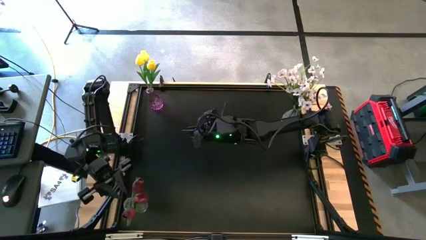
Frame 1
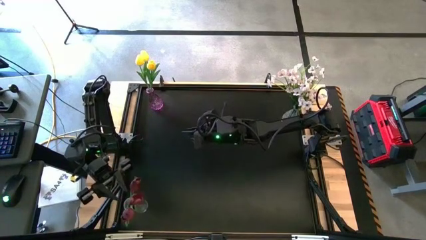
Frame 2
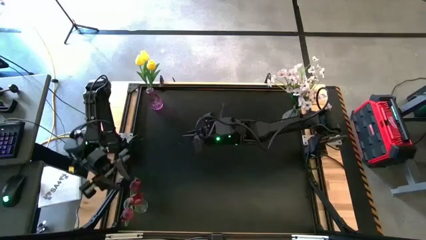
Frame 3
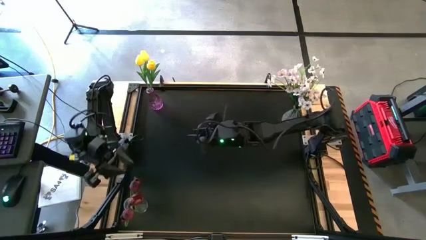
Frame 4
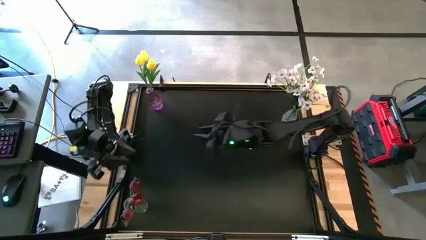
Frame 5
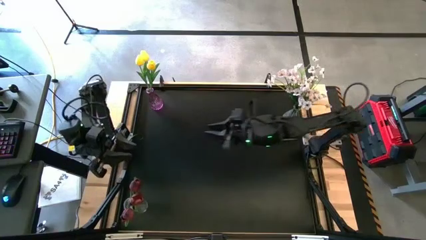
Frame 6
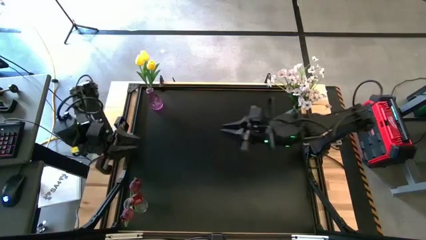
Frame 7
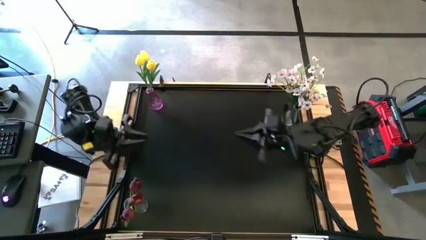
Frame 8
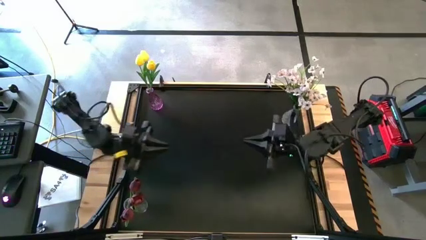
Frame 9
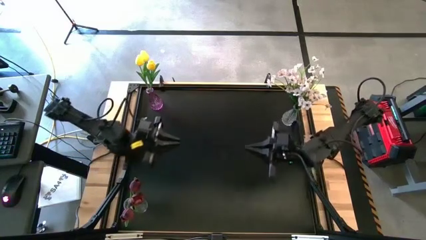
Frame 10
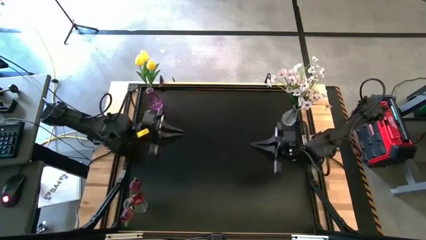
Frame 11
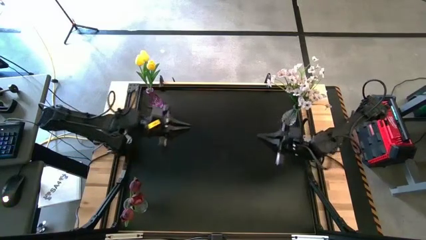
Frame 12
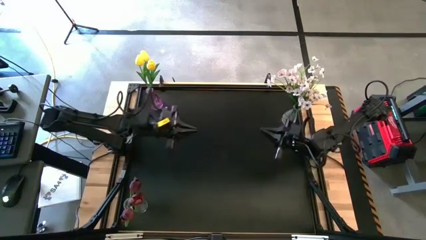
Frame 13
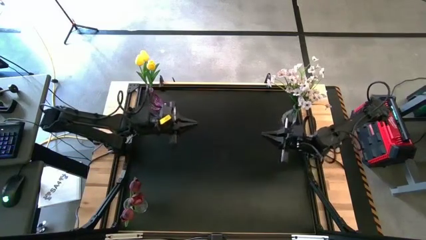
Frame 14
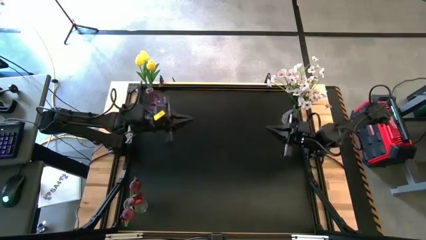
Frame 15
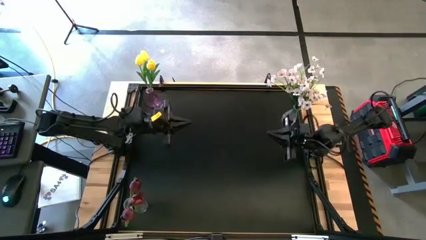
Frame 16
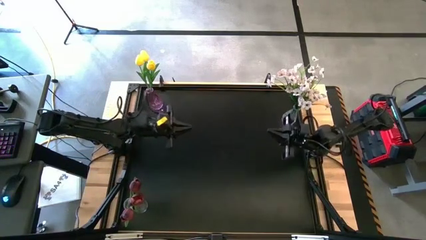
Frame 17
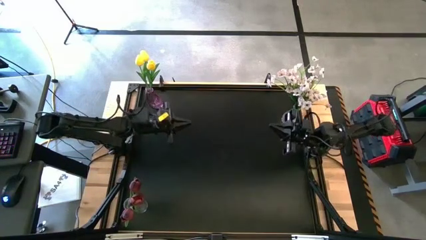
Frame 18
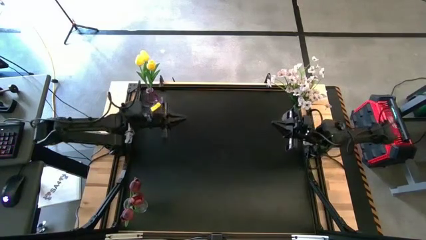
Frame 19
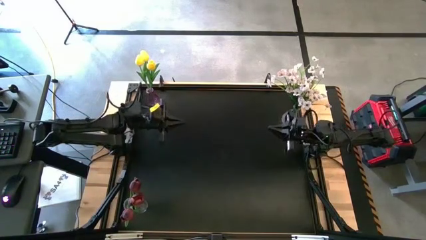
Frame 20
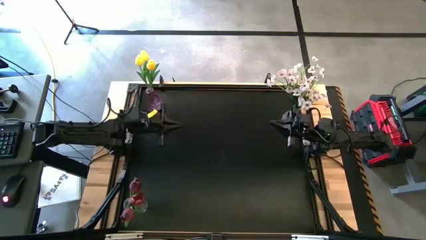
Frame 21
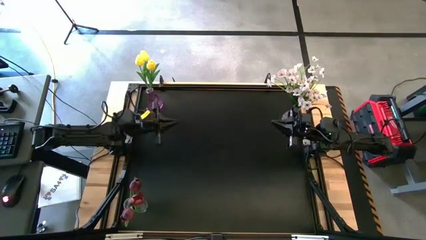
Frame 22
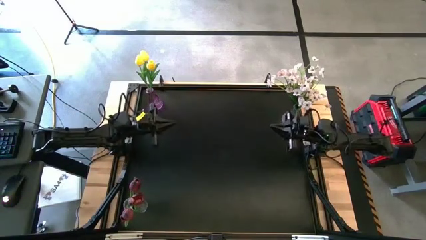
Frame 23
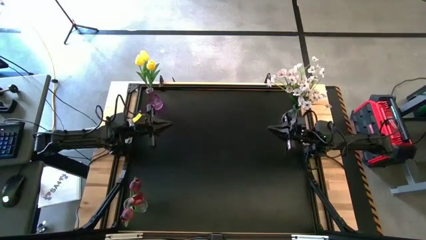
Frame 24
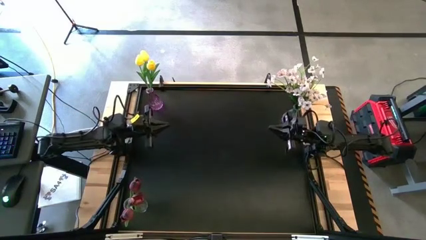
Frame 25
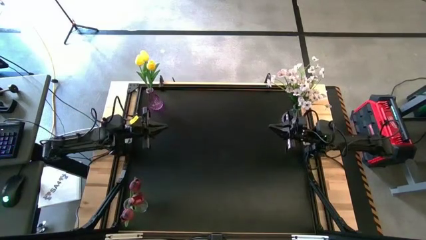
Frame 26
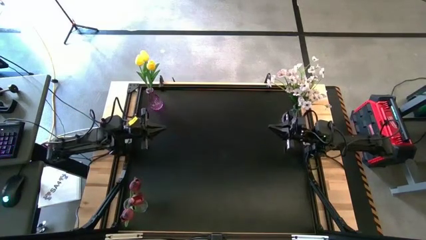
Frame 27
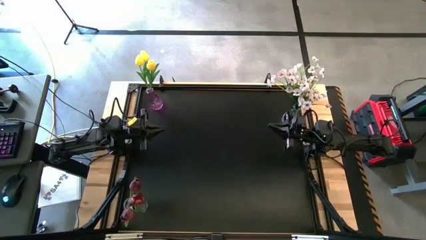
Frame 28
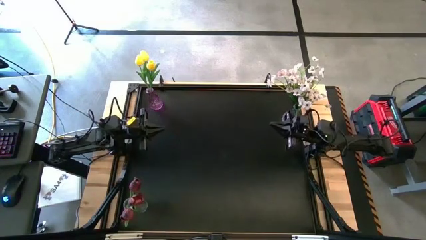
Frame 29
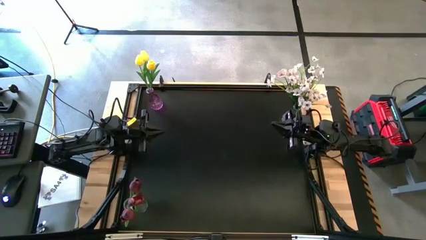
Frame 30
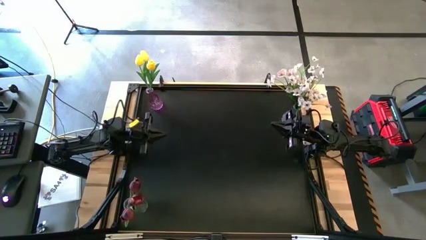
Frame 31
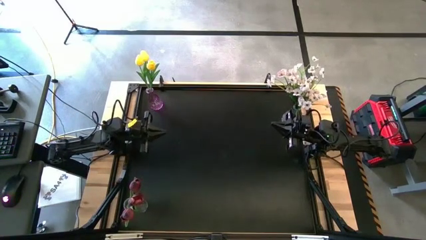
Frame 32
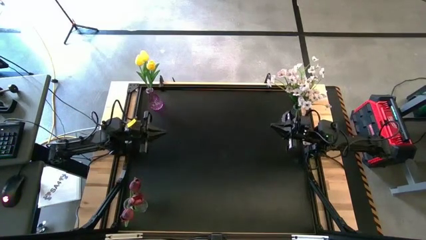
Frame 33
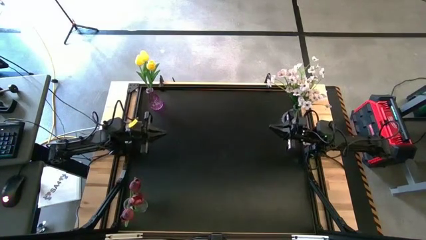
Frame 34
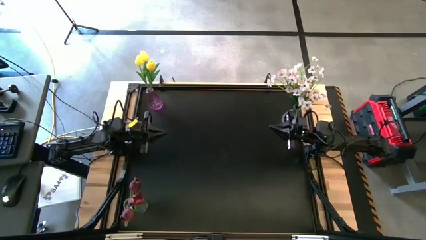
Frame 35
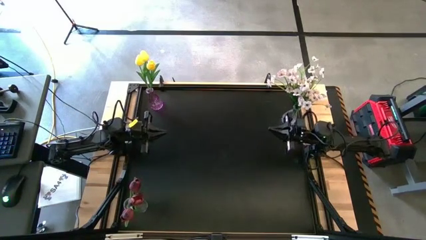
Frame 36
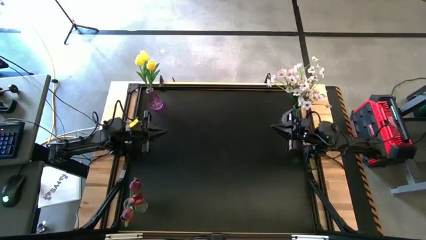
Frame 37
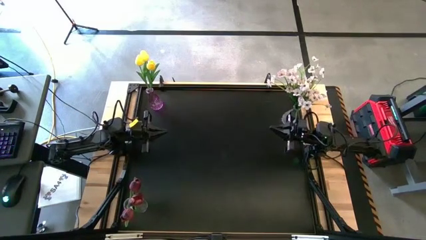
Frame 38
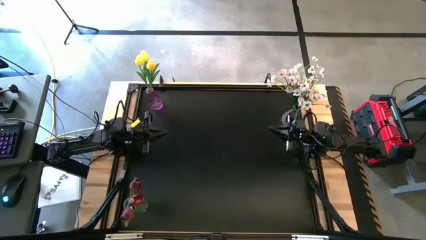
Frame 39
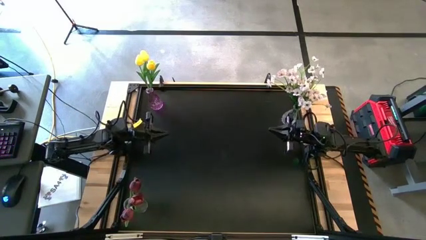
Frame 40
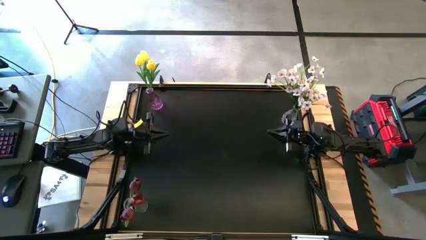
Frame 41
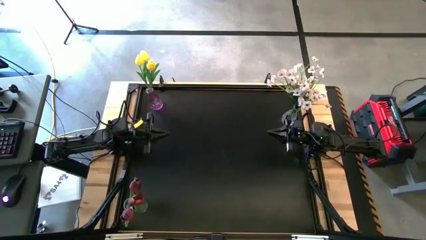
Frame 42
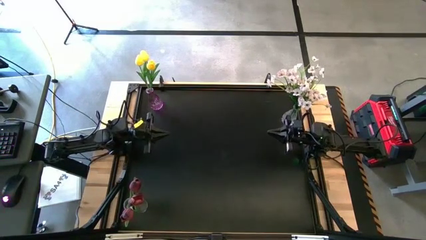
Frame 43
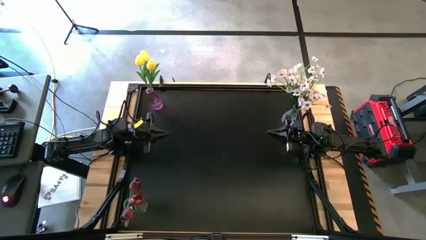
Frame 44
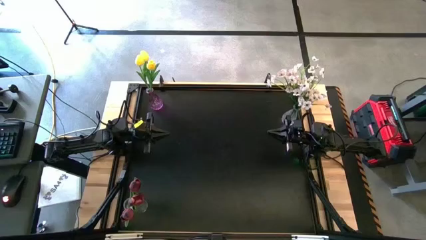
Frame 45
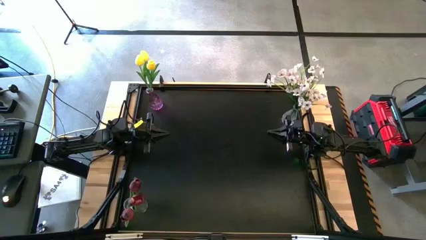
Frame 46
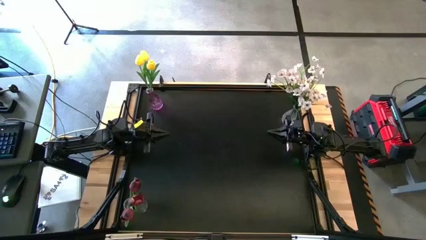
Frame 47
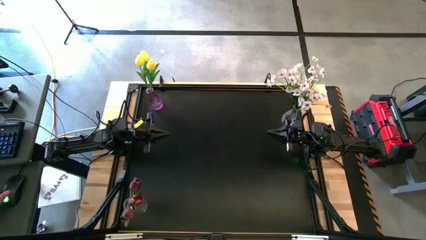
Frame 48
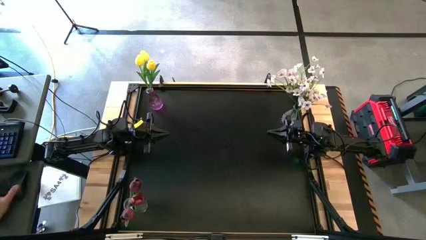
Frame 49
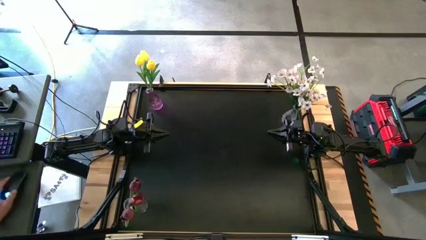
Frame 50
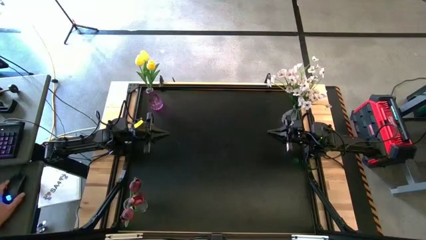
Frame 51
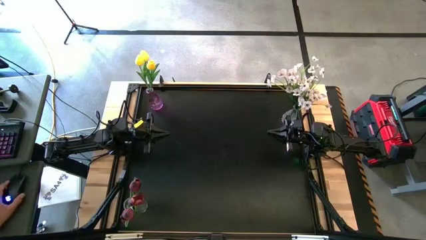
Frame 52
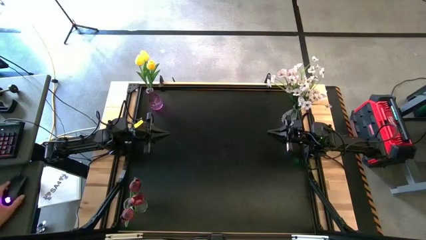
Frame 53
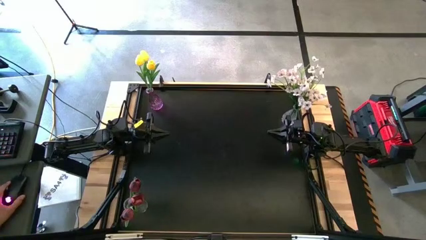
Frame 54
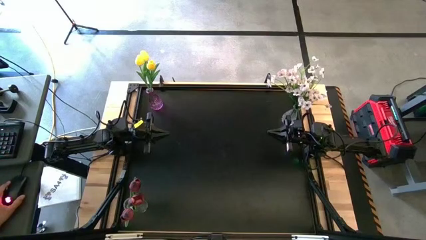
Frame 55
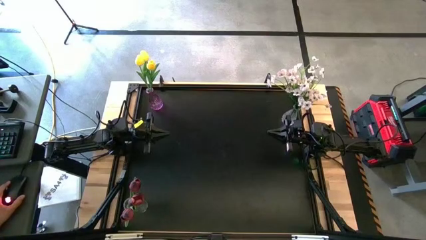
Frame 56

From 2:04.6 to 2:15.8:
Task: Sort flowers into vase by color
Return to Home Position

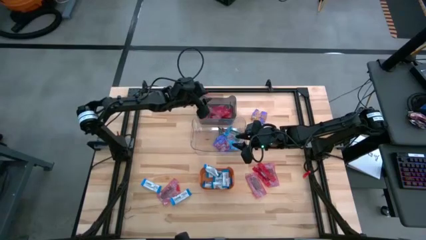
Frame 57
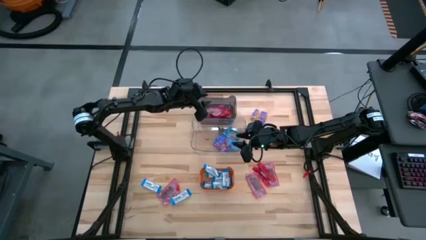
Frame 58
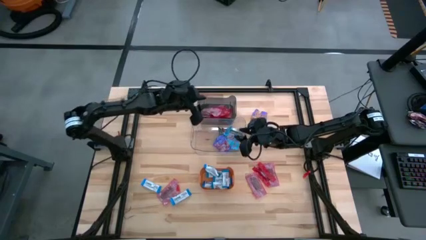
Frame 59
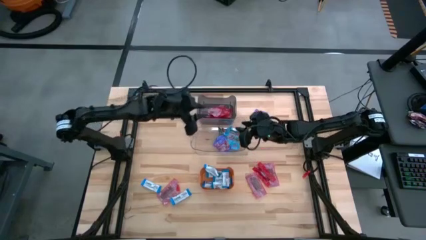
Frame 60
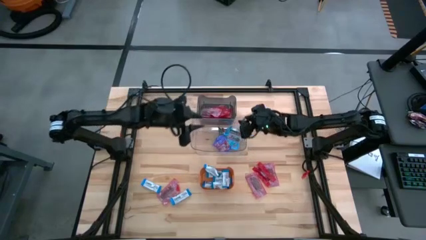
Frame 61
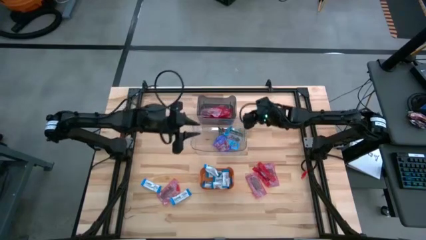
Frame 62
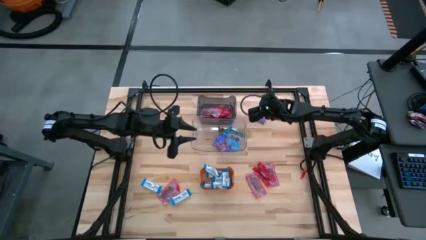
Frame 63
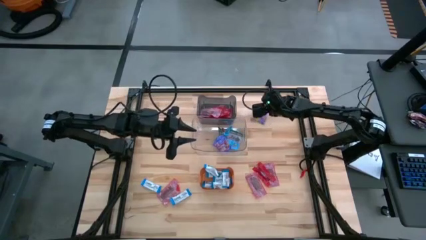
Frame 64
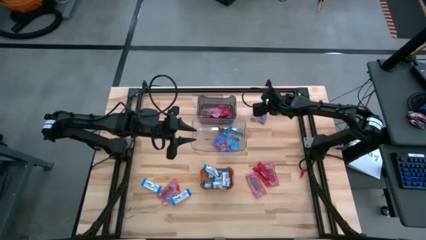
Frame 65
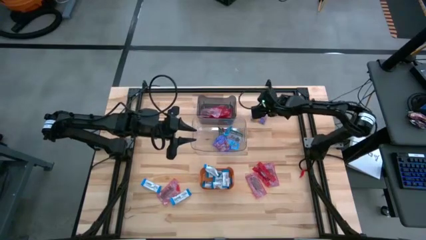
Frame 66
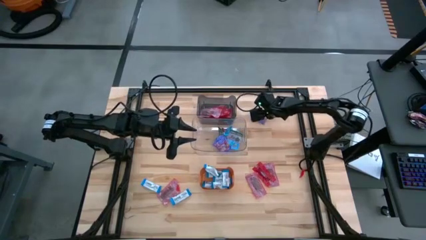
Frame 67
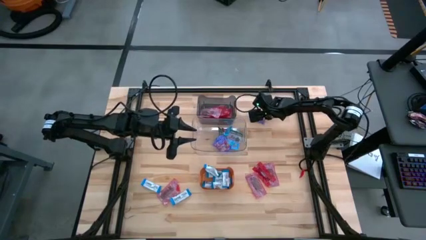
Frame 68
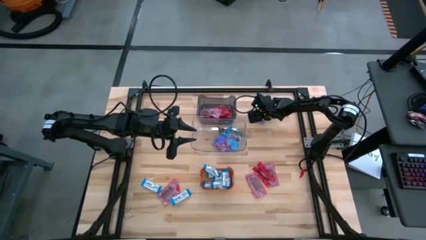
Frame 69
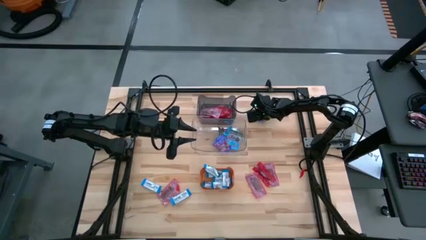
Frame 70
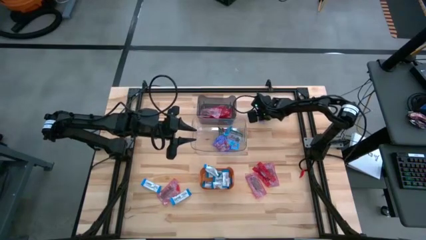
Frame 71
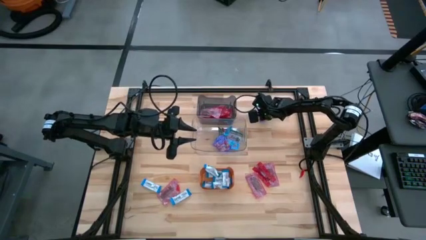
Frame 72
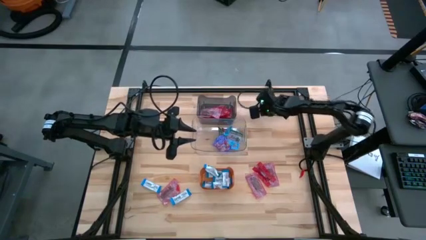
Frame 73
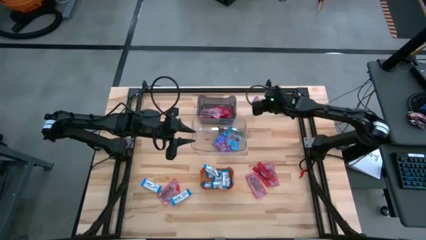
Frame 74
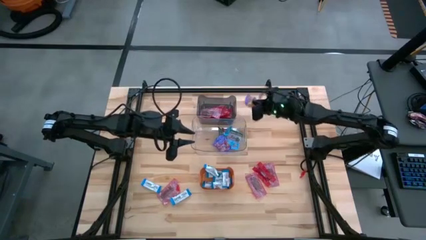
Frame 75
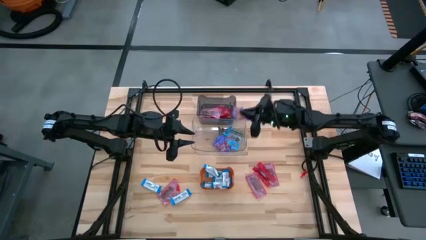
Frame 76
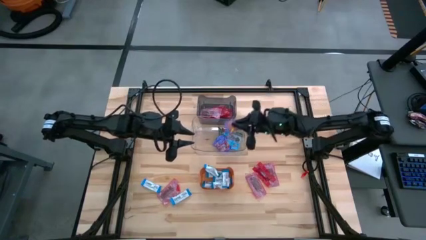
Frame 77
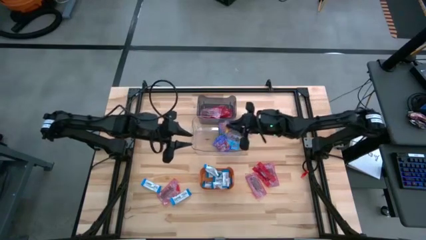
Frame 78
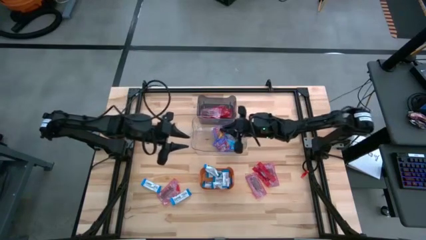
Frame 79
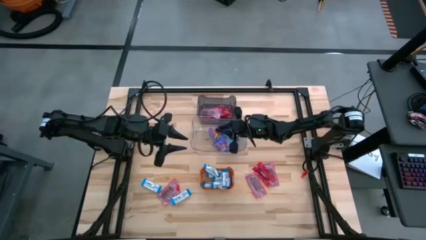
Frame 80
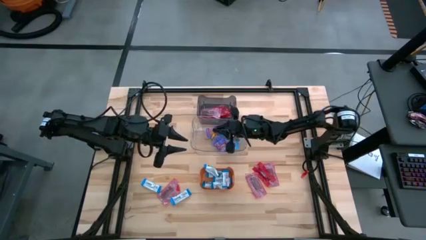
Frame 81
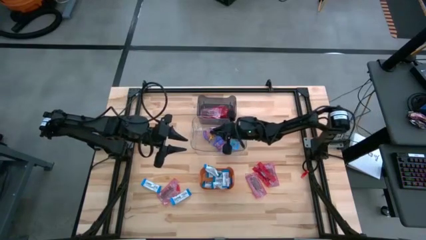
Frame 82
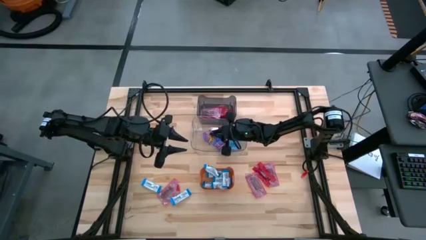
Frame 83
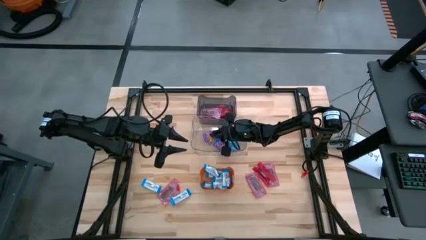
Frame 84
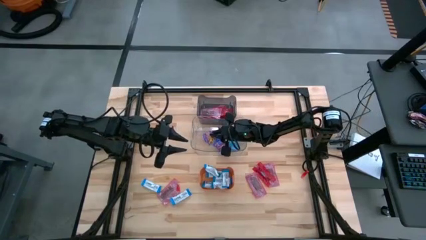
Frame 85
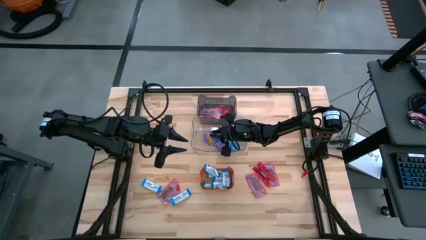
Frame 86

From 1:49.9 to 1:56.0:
Task: Sort candy
Put the blue candy into the clear transparent bin
